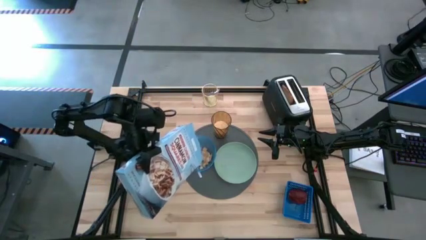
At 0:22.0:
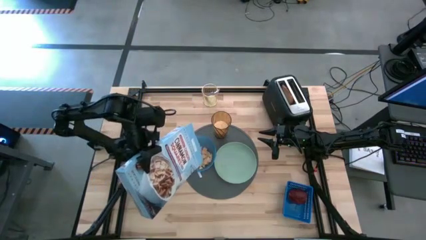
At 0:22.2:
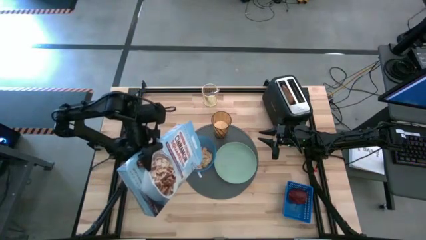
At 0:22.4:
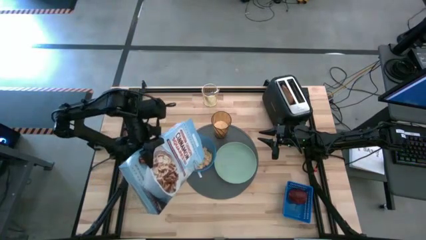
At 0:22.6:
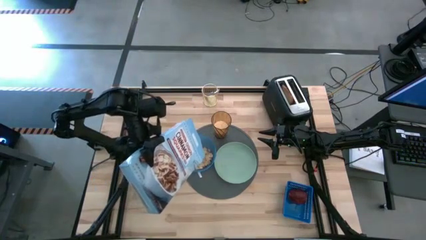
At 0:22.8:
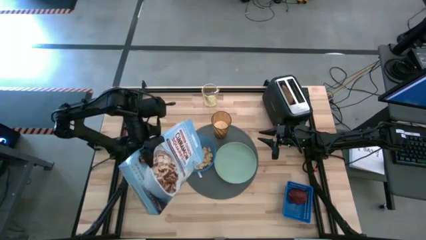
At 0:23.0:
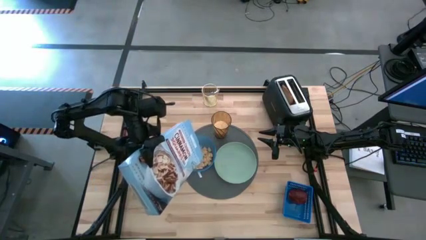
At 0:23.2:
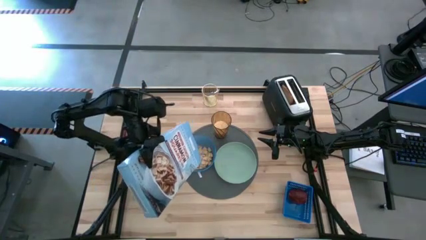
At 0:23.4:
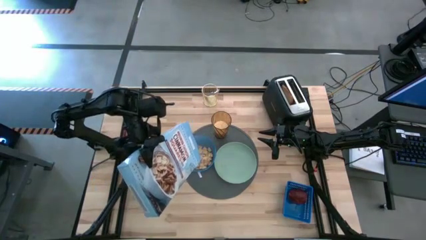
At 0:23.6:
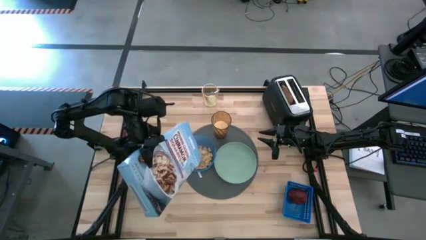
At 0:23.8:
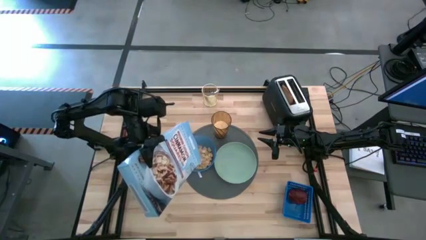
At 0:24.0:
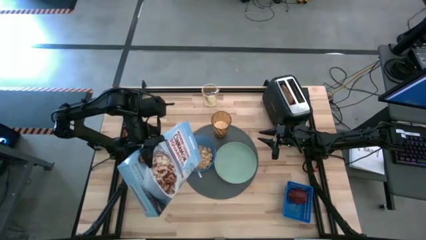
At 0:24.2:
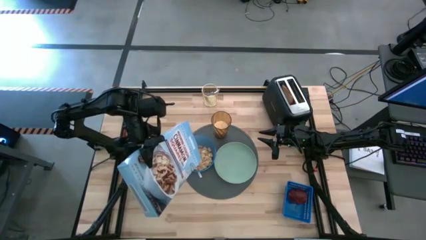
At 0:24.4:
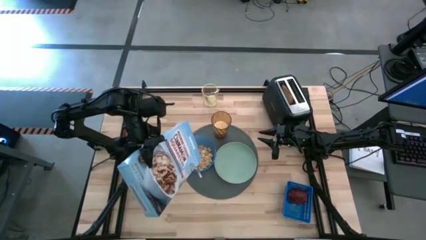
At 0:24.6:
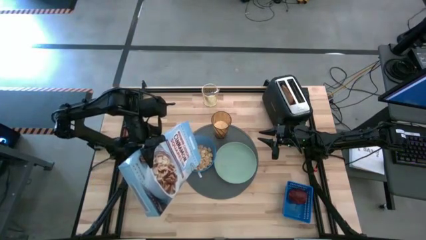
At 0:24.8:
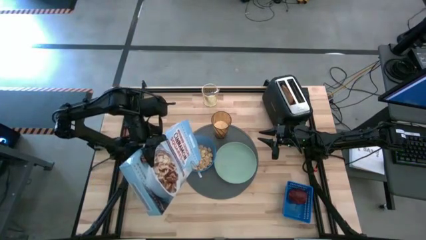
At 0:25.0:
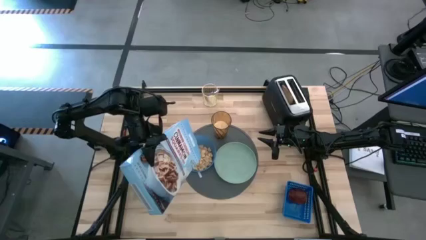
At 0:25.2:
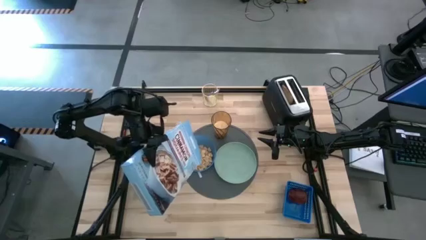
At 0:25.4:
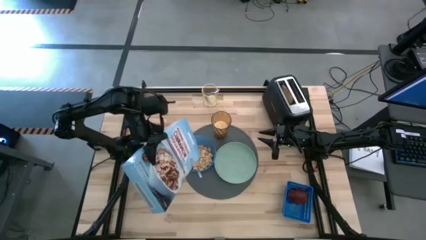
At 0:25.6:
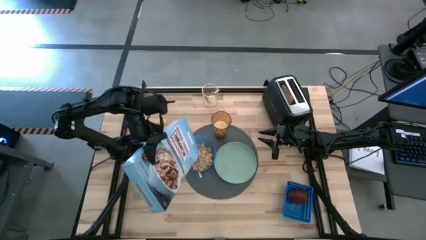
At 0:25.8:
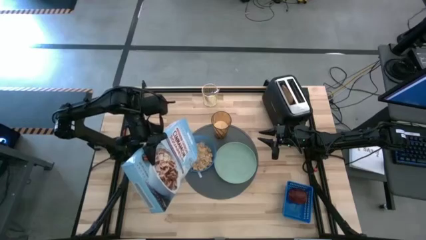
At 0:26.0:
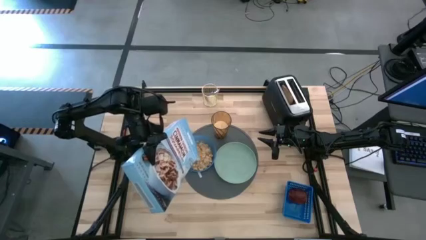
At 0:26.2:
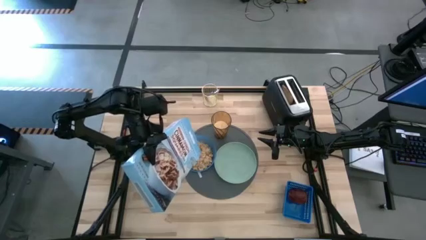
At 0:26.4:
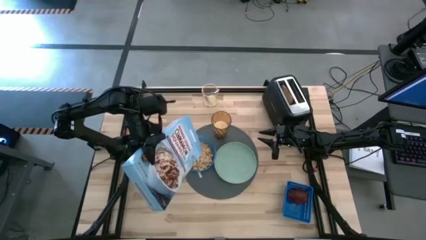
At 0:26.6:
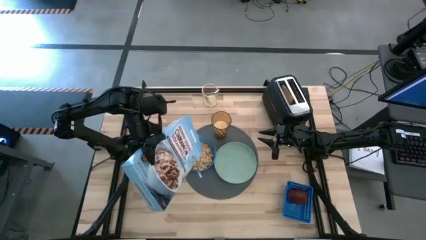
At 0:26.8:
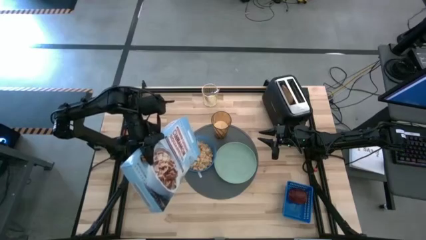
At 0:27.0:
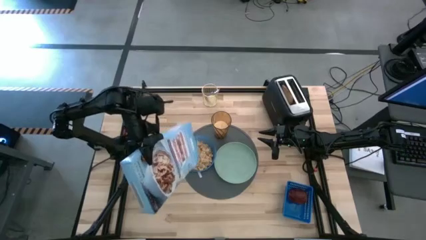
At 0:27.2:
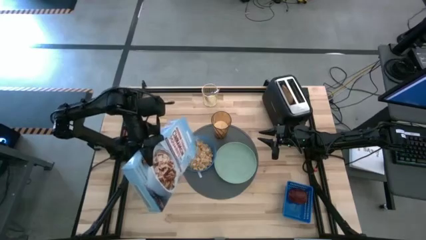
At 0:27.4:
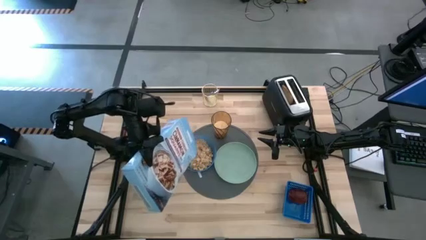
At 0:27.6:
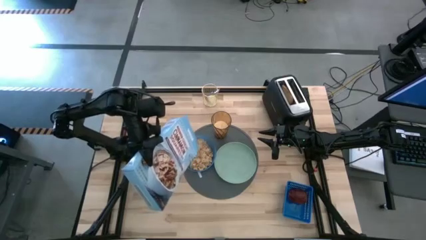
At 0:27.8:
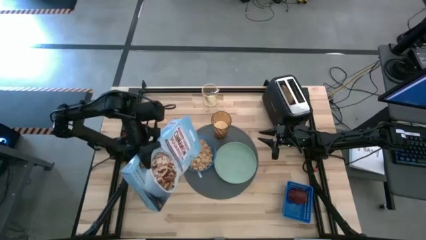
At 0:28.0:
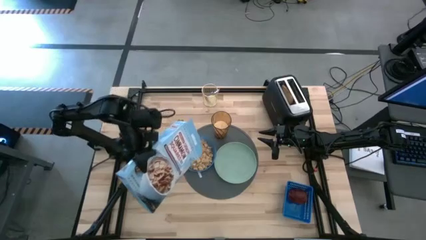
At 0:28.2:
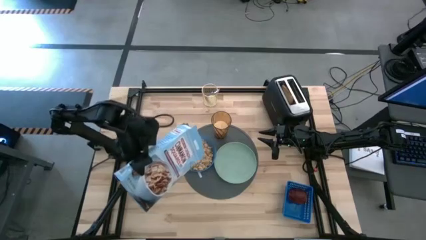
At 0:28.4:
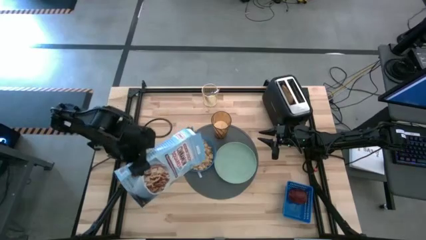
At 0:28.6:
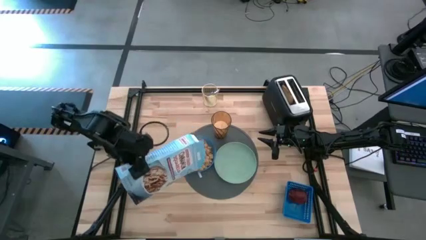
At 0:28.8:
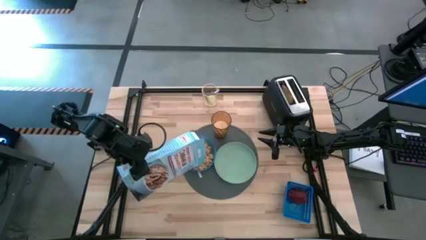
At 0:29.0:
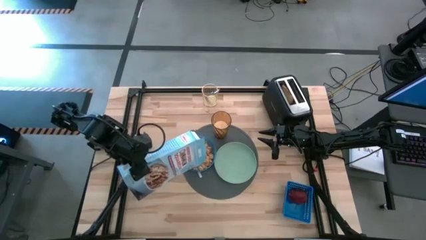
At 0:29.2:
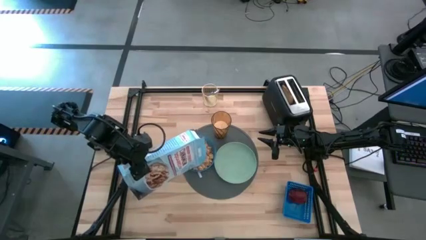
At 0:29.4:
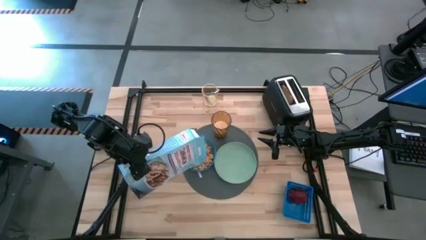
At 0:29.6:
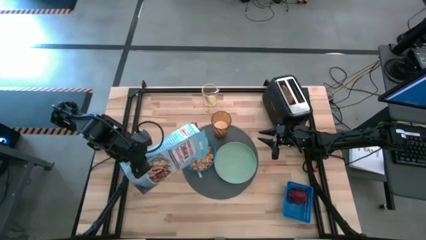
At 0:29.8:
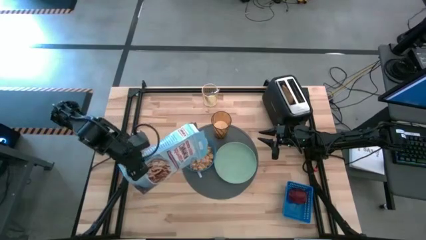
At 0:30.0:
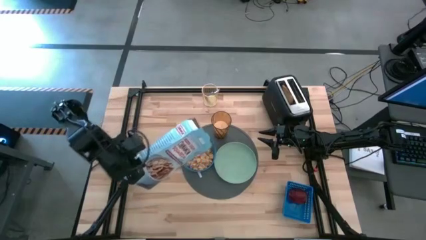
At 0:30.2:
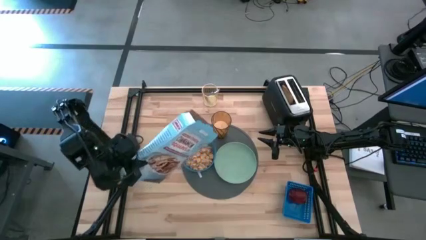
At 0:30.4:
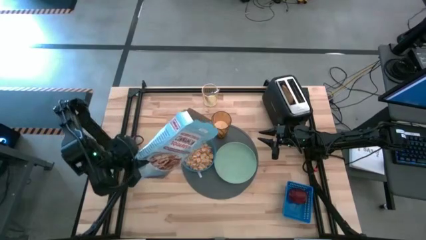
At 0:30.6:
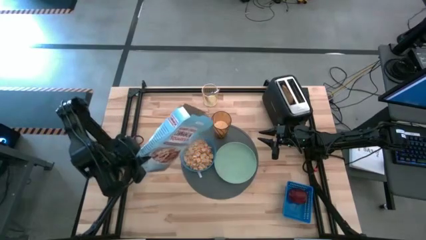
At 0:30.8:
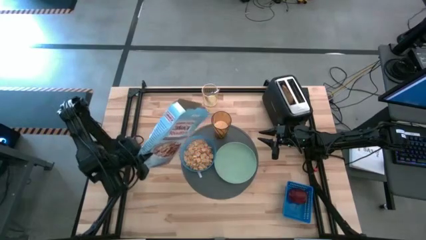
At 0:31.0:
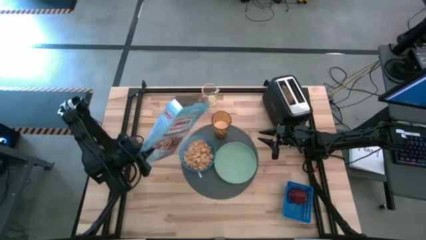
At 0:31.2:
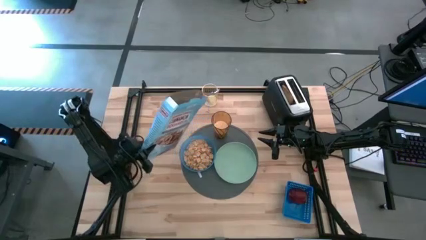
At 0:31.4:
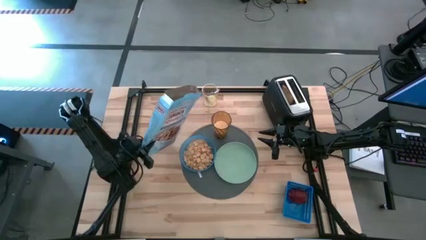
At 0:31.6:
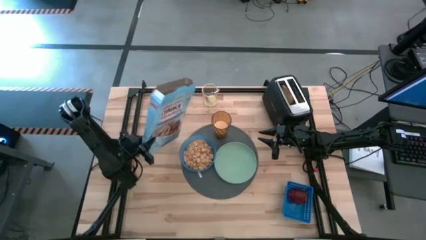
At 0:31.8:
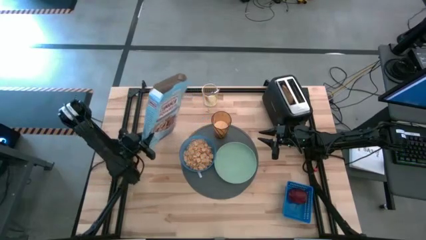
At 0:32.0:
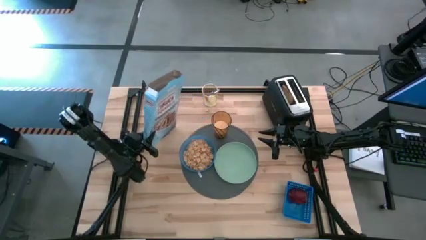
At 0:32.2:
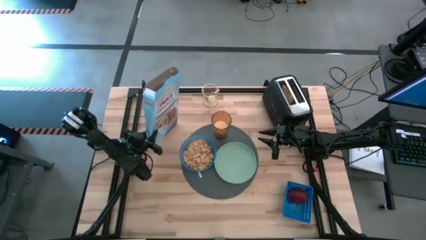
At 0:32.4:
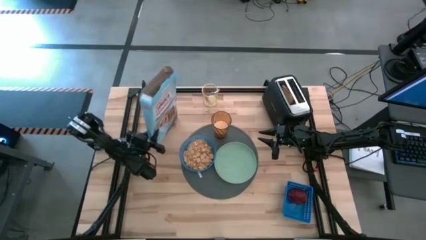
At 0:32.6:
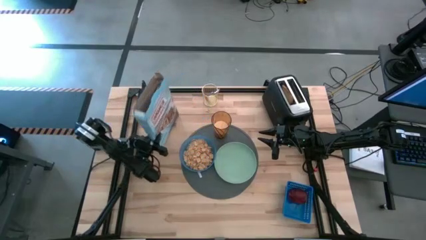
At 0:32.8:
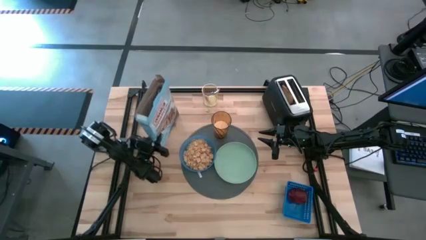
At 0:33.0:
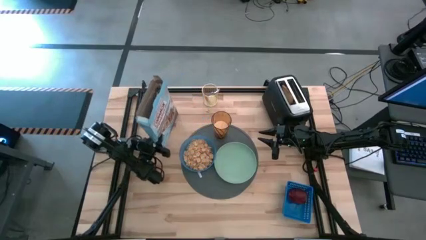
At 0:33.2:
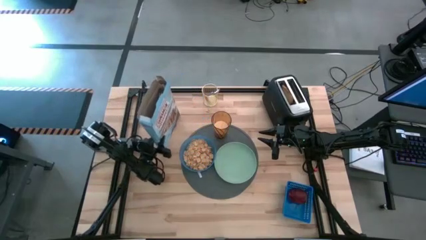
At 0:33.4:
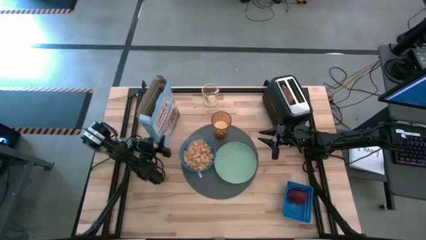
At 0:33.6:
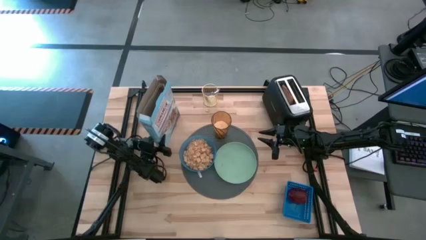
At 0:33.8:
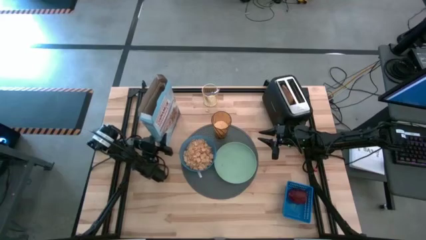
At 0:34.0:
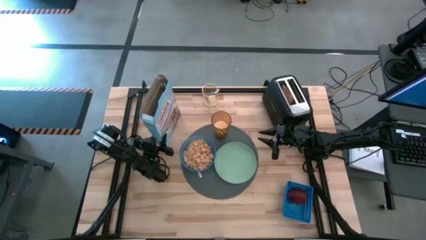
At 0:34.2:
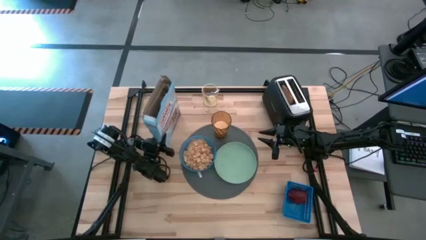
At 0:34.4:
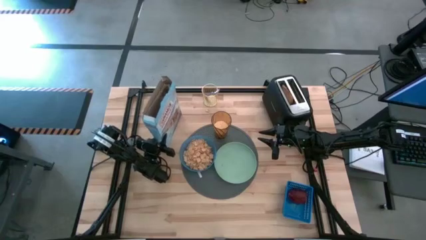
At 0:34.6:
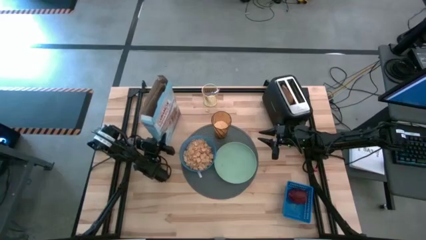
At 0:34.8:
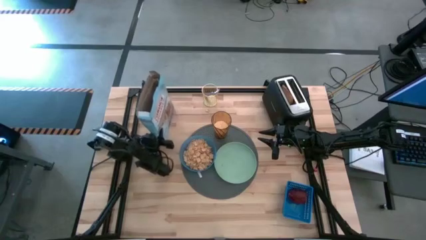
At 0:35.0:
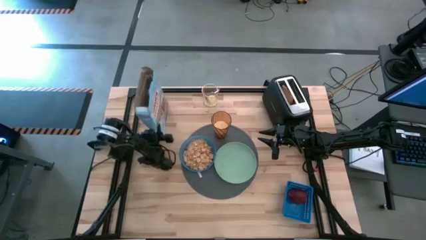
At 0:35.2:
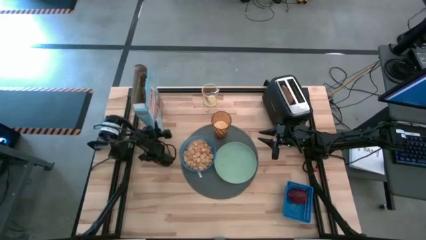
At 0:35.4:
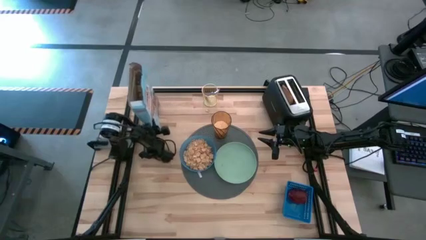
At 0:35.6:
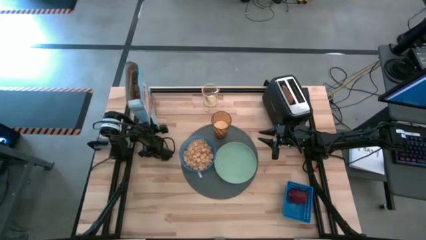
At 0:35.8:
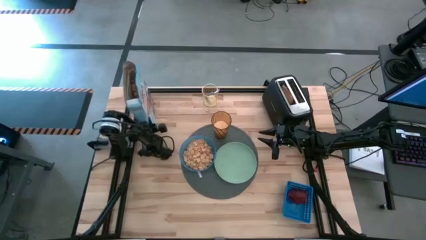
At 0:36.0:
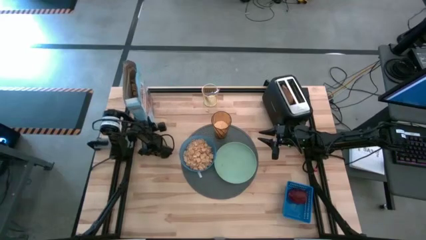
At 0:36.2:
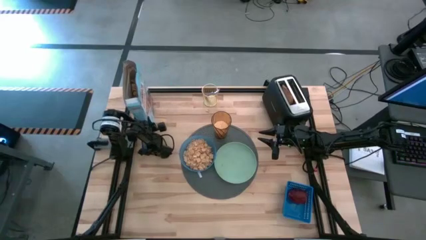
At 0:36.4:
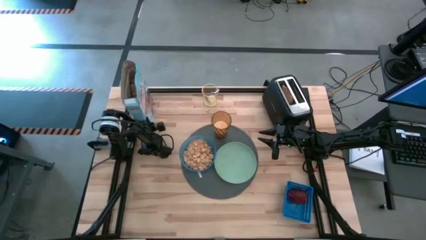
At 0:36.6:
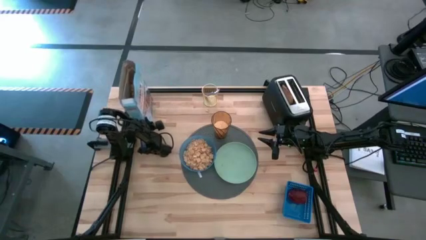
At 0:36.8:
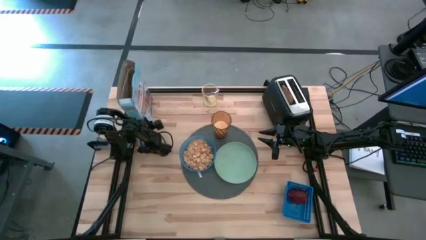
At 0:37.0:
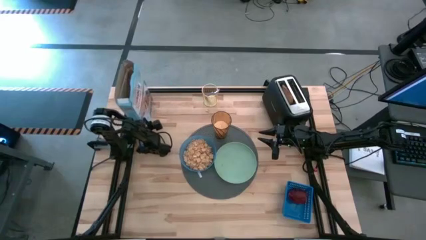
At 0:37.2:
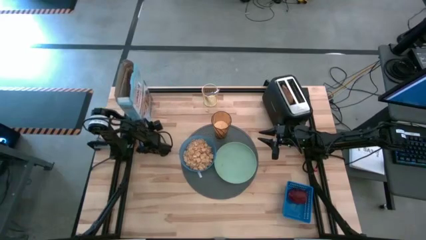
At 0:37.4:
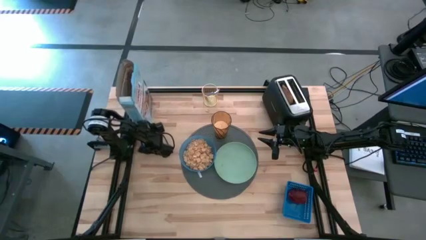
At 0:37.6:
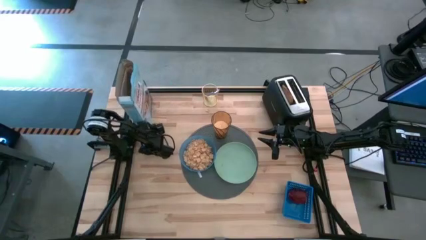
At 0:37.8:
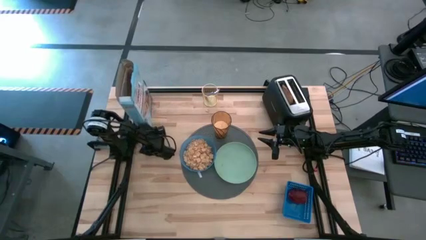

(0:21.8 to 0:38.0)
Task: Arrange a breakfast setting
Pour the cereal from the cereal box into a blue bowl

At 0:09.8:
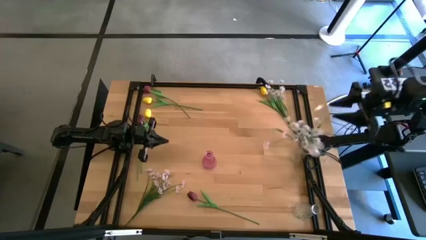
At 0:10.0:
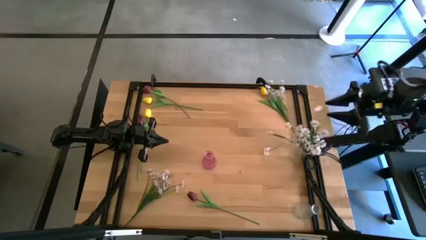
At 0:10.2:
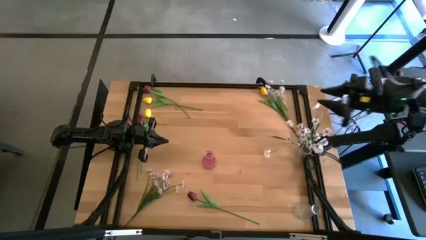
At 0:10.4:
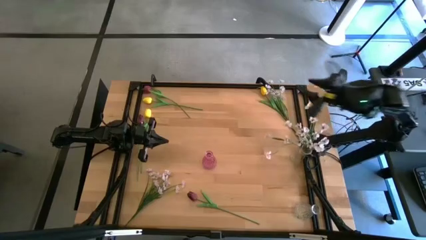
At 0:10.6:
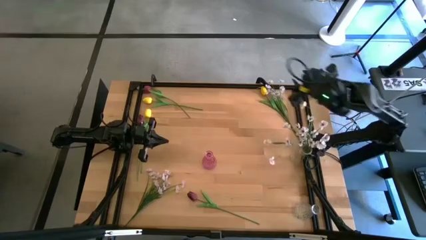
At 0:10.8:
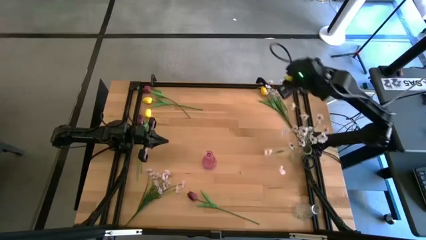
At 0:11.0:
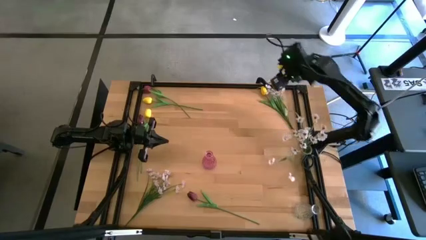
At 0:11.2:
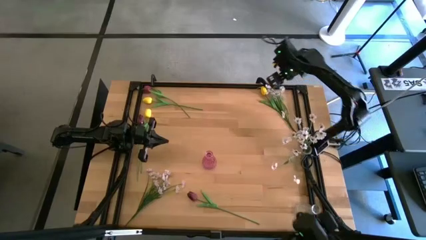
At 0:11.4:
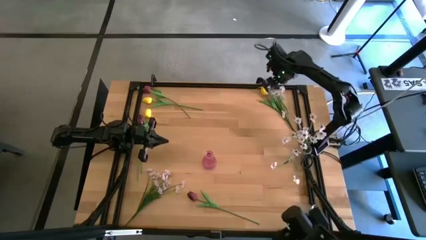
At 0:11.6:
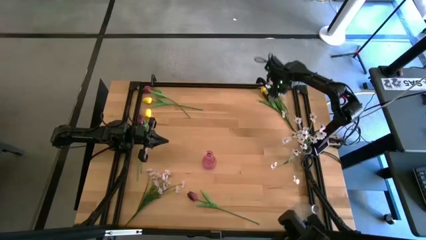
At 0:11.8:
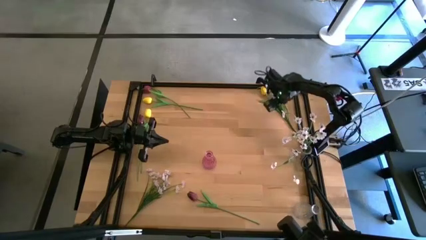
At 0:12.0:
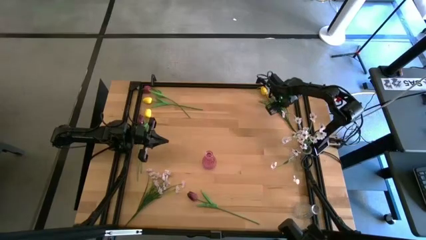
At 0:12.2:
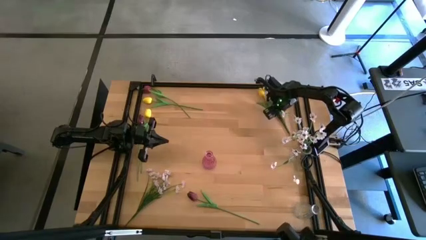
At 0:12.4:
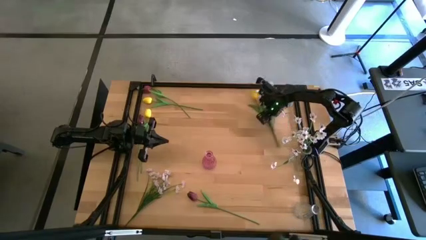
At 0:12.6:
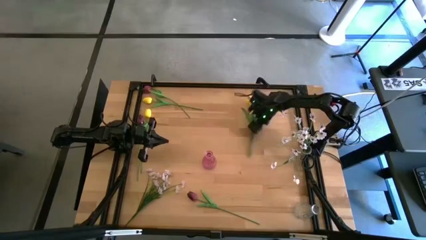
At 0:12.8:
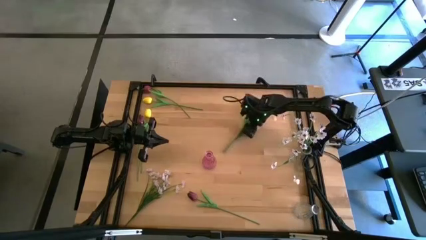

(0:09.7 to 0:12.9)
Task: Sort flowers into vase by color
Adjust the flowers on the table
